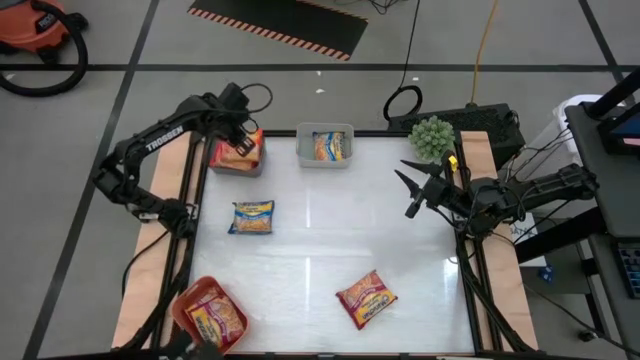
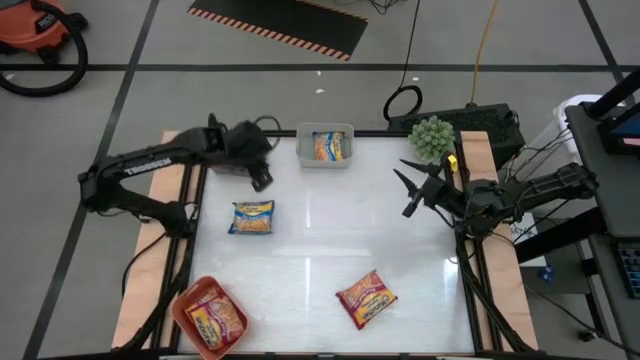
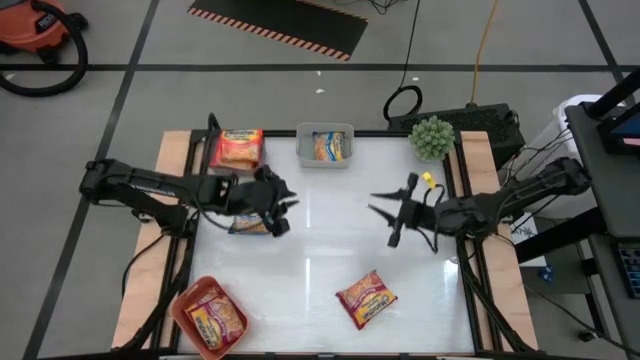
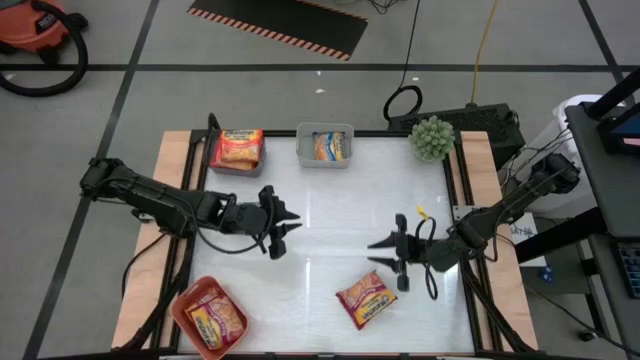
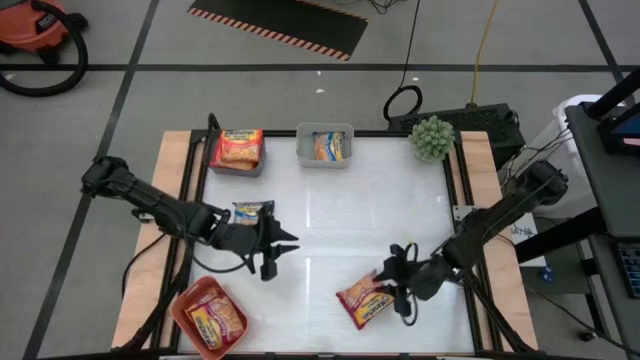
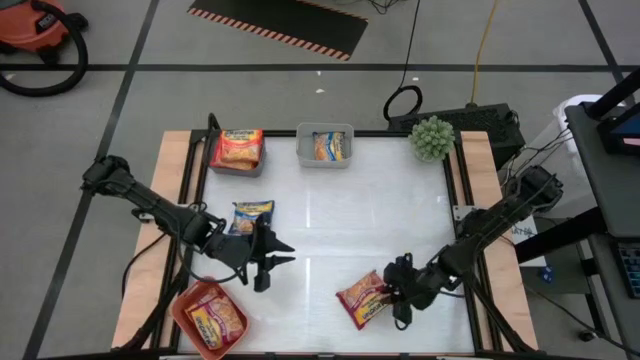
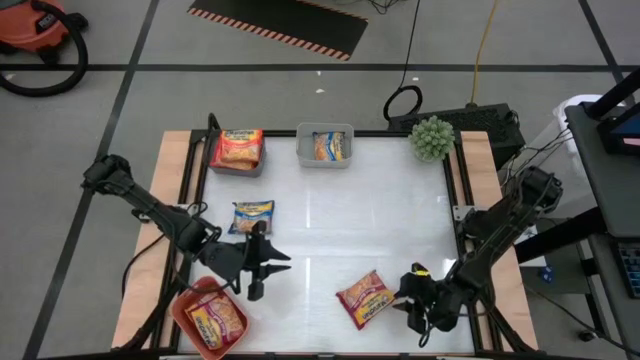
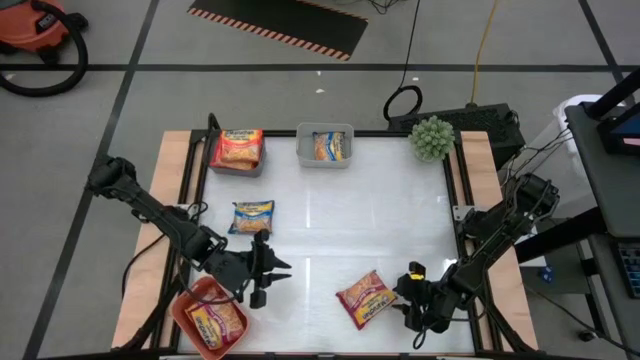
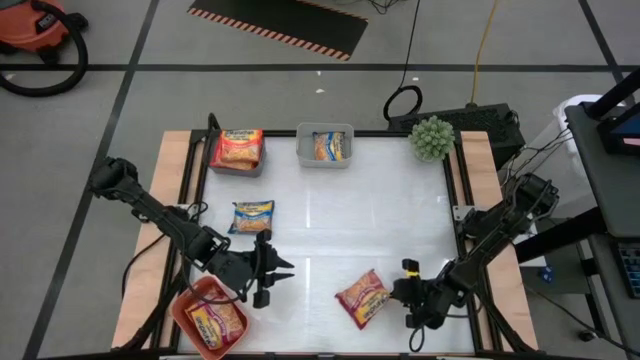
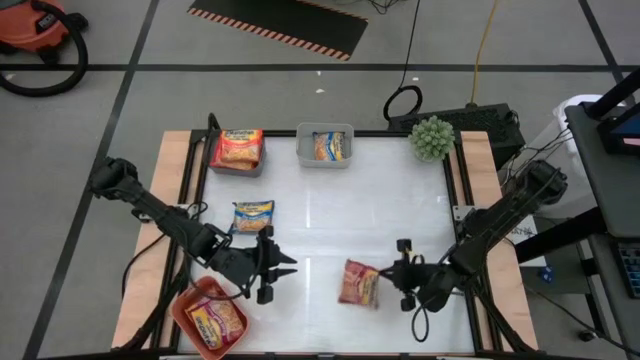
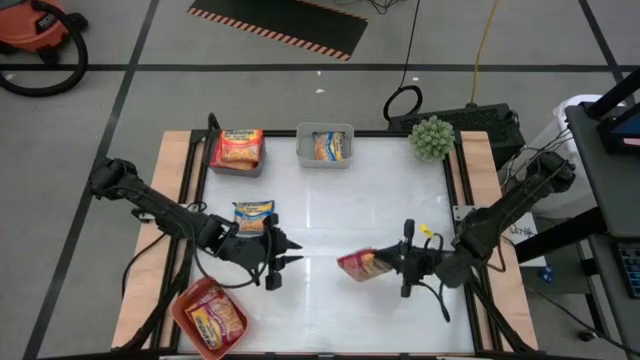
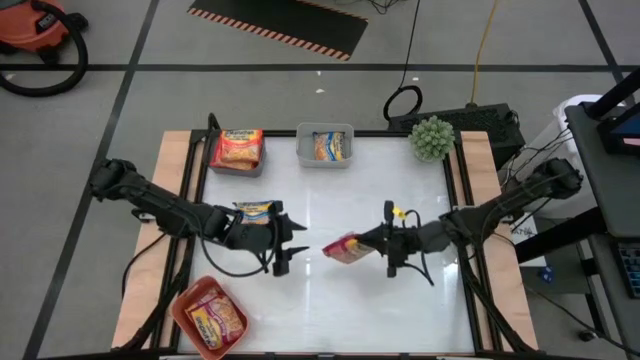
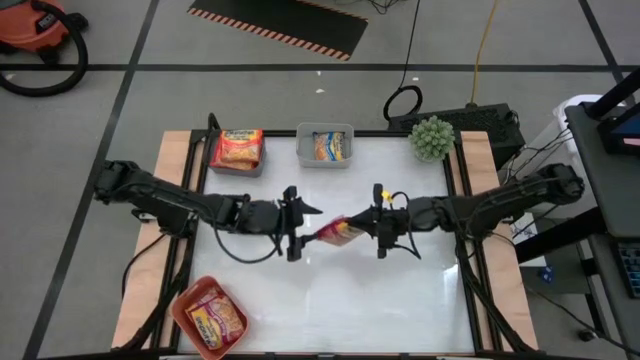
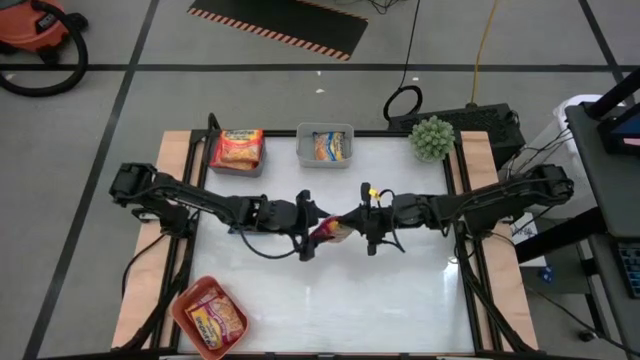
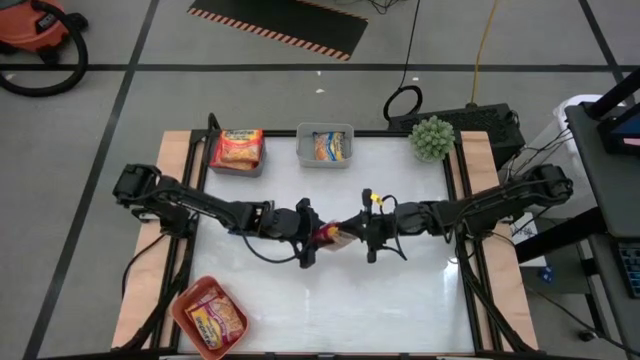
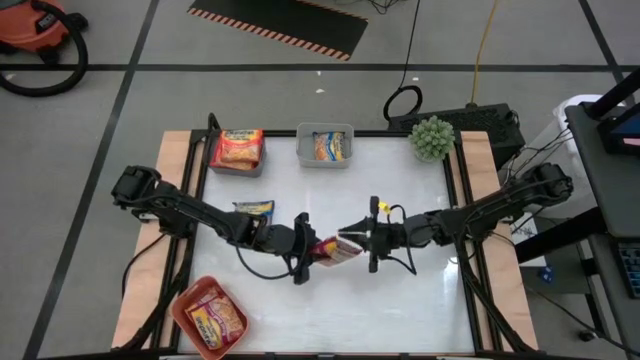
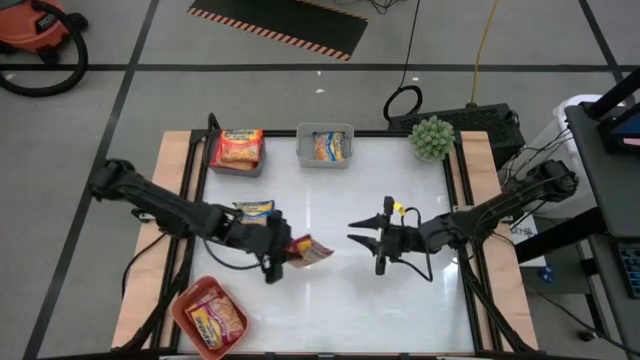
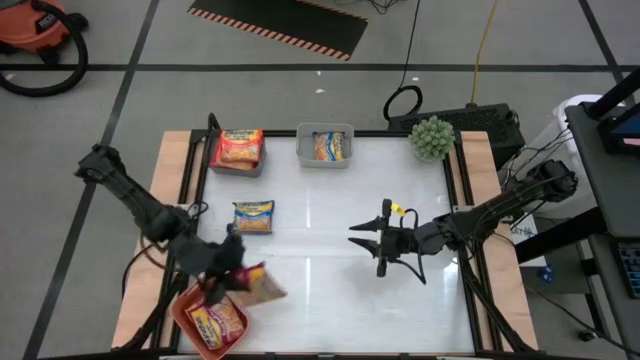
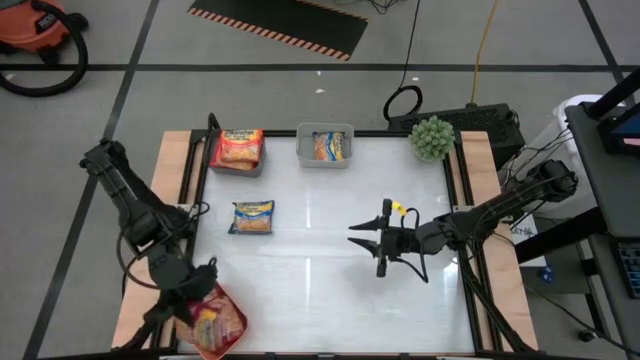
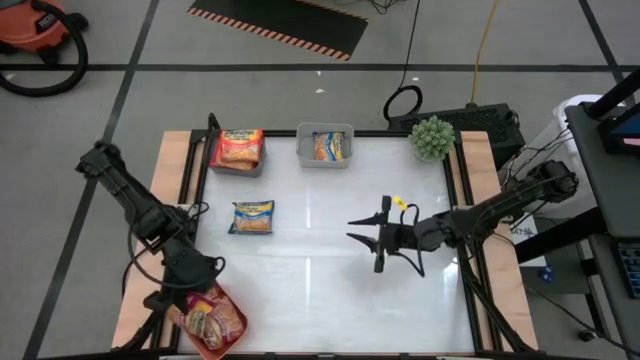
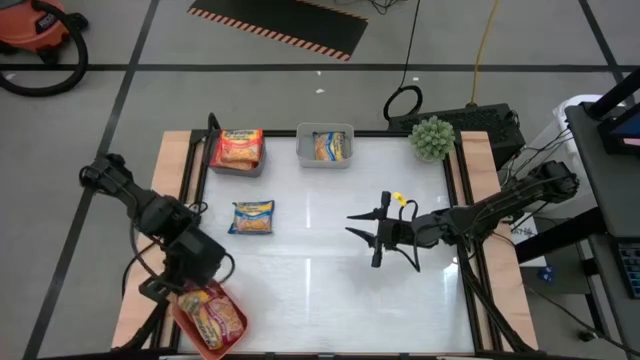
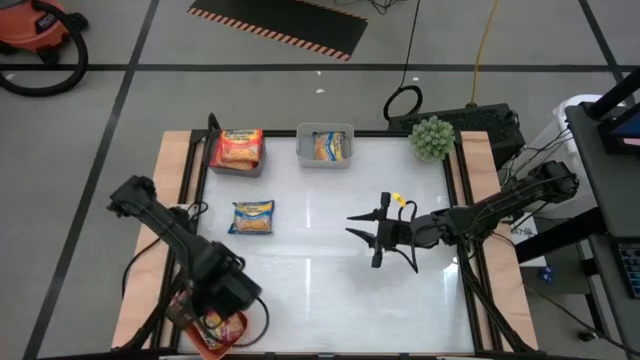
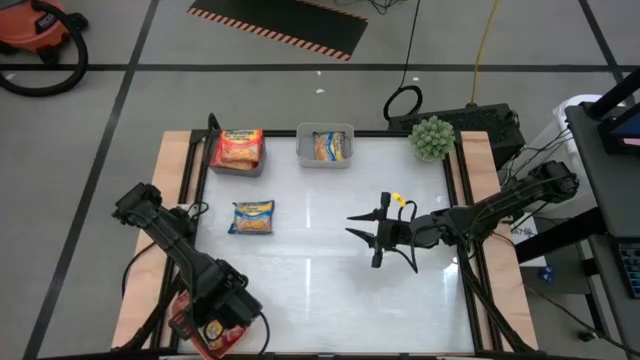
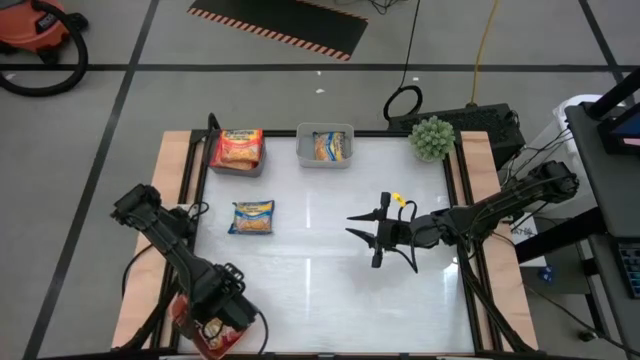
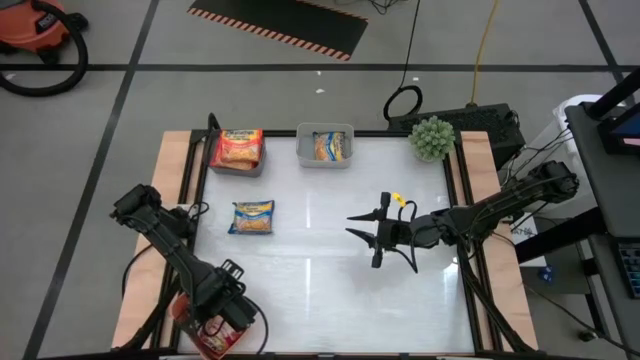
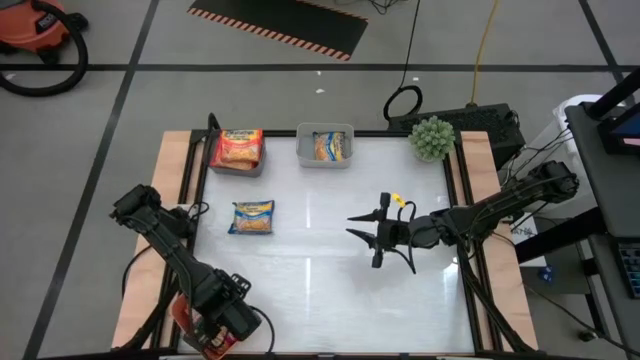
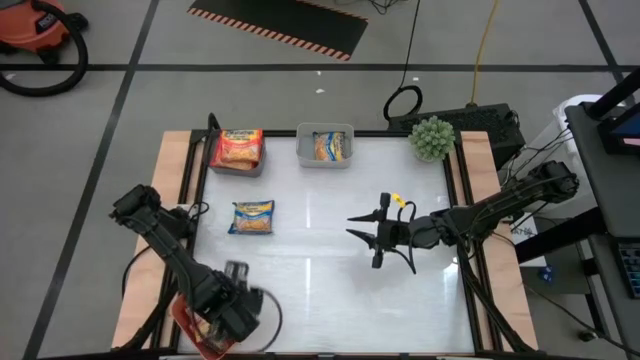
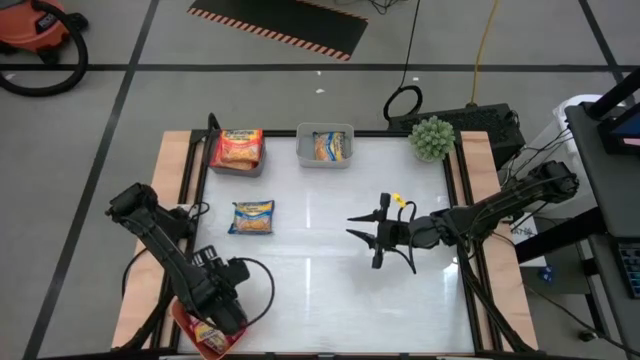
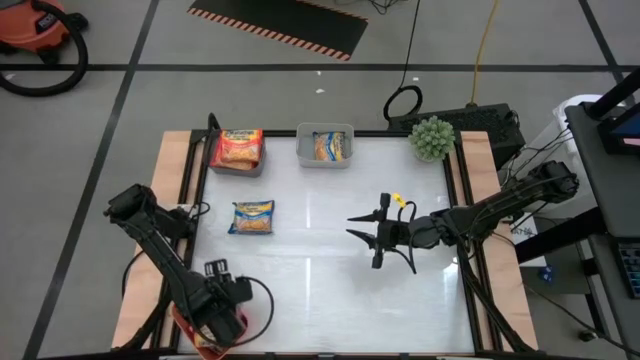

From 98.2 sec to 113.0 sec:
Task: Sort Maruchan noodles
Put the red noodle pack into the orange bin

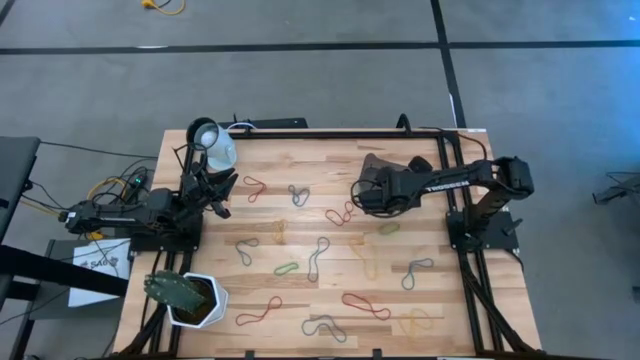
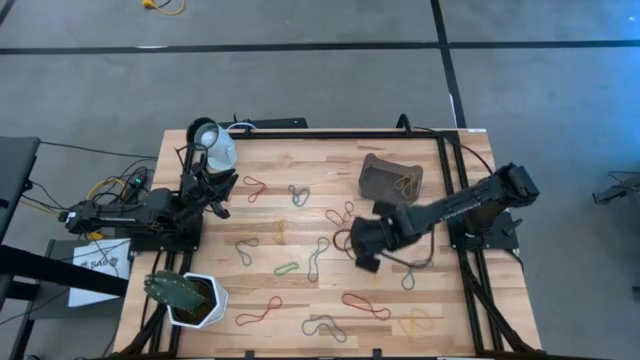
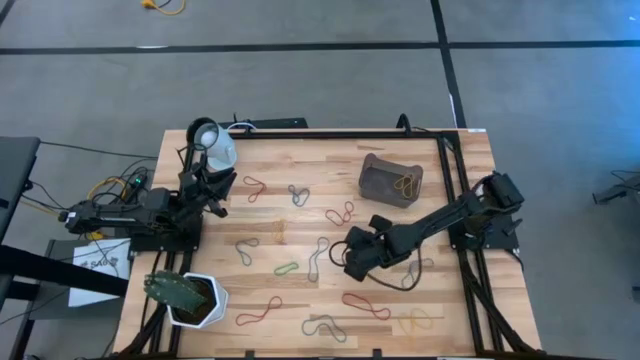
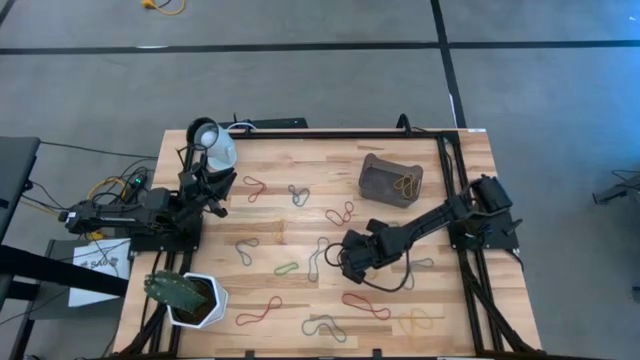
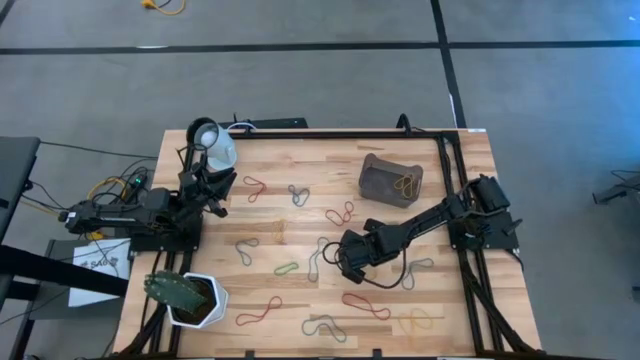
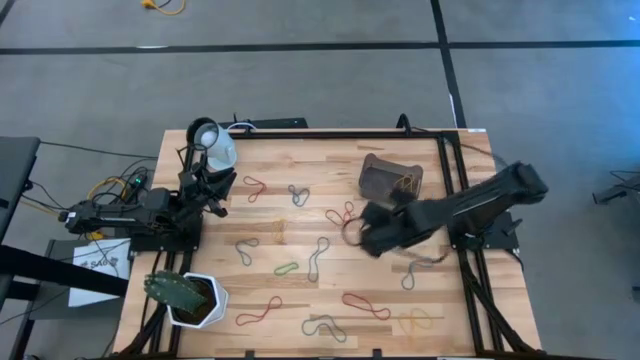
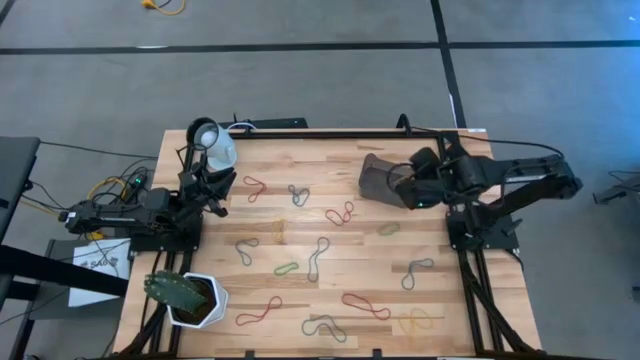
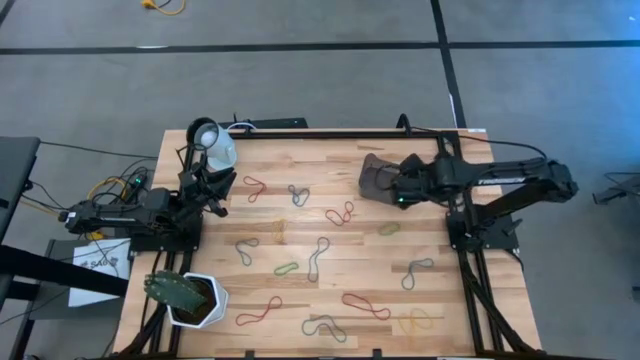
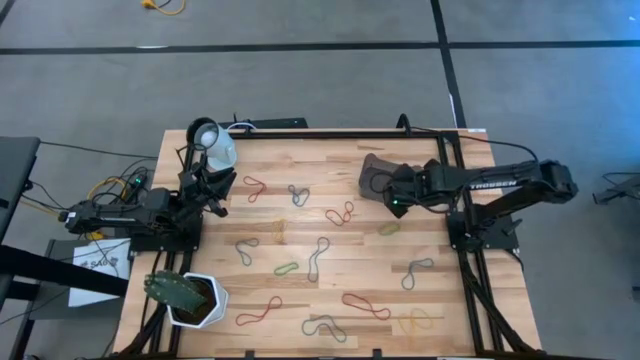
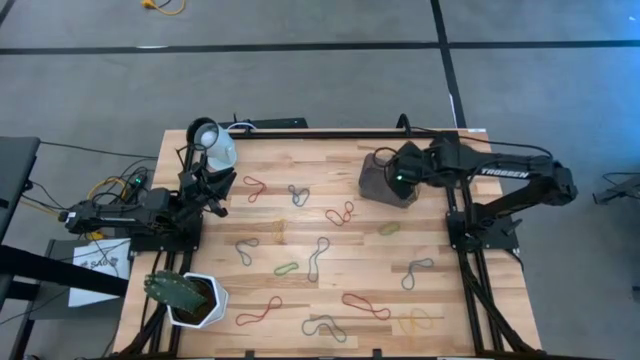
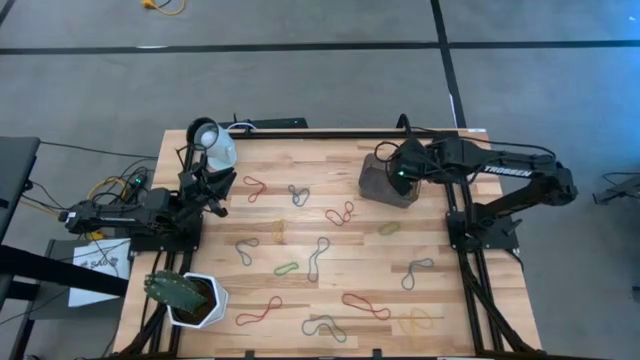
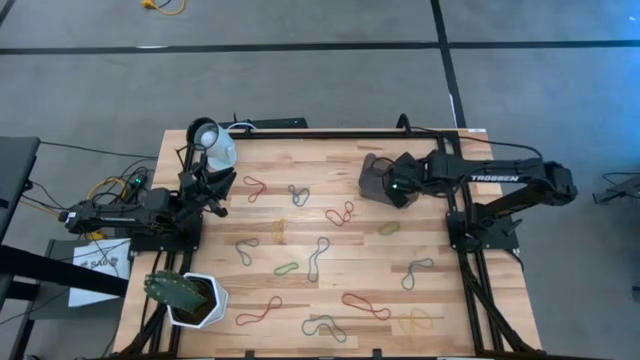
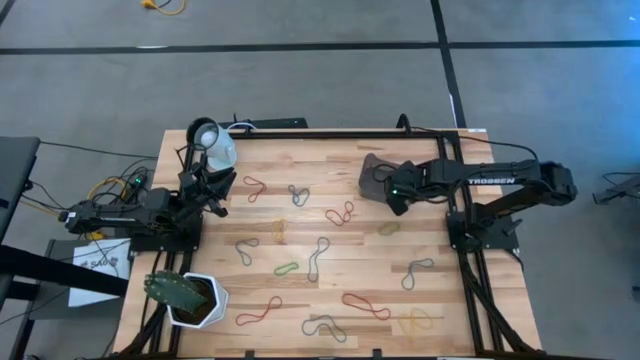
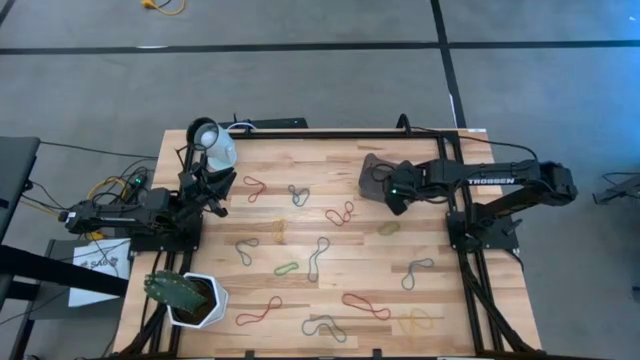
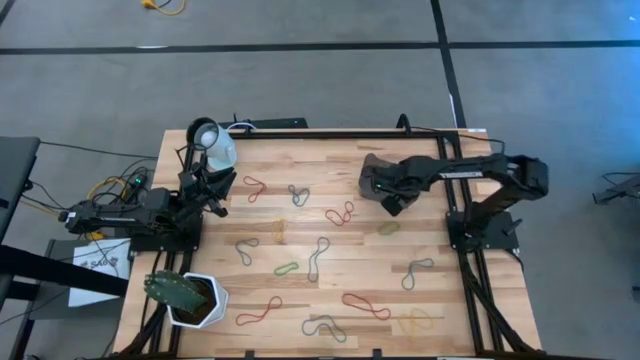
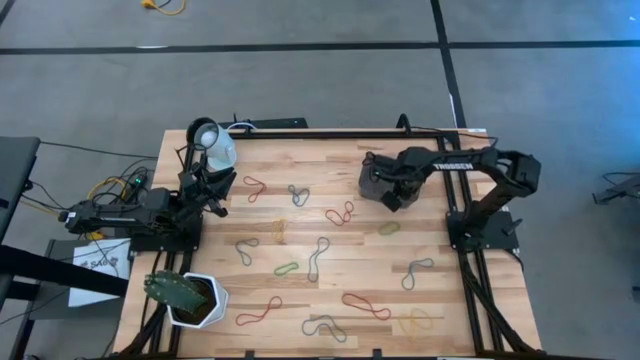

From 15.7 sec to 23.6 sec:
Task: Pick and place rubber bands into bin
Put the yellow rubber band into the black container
